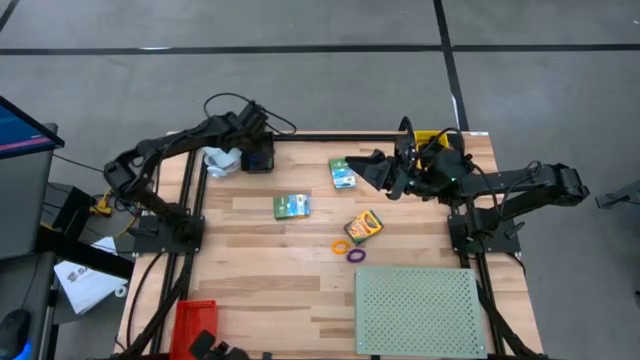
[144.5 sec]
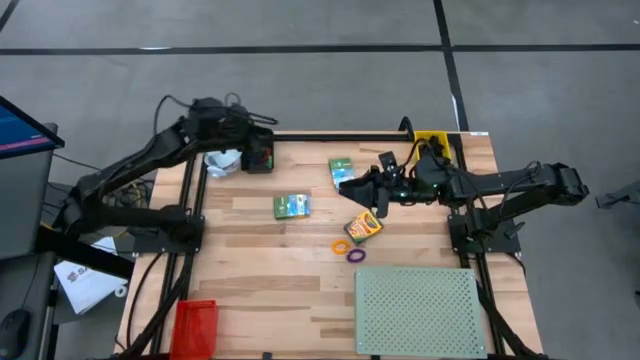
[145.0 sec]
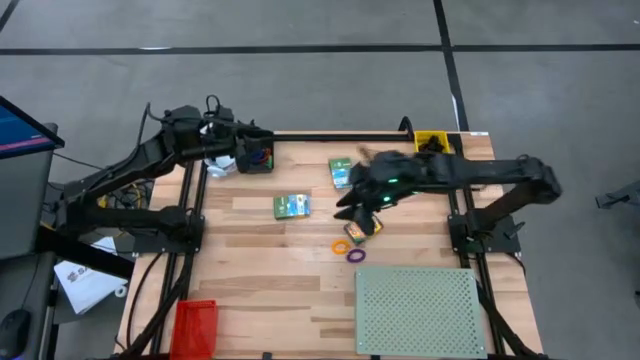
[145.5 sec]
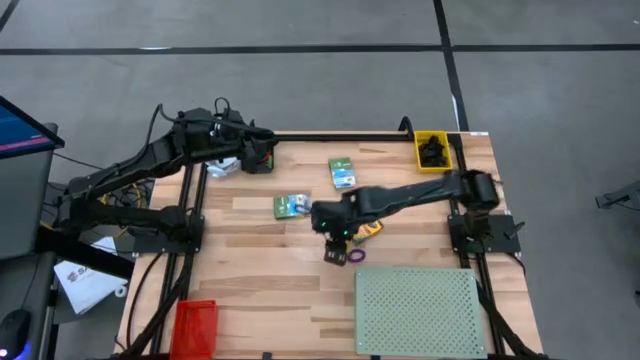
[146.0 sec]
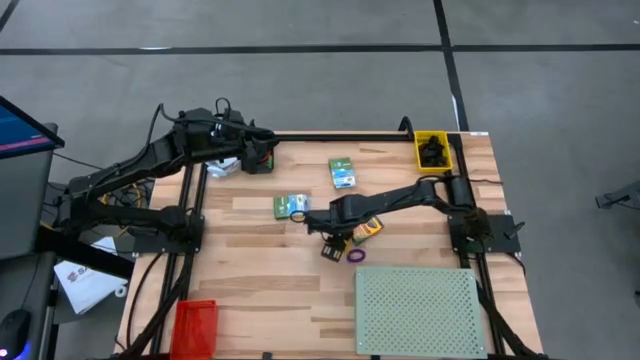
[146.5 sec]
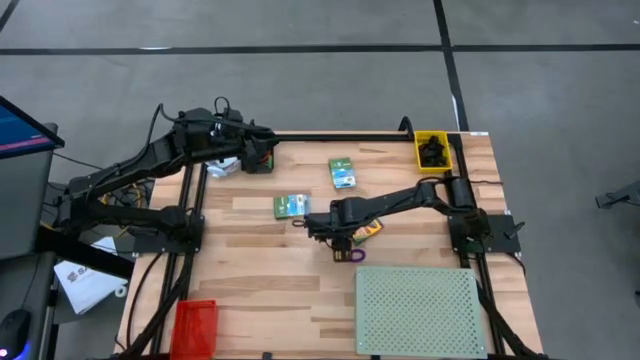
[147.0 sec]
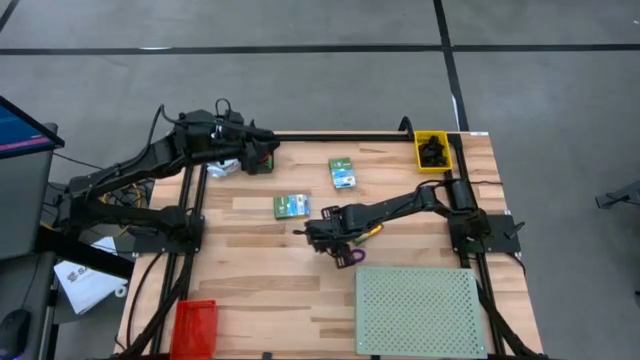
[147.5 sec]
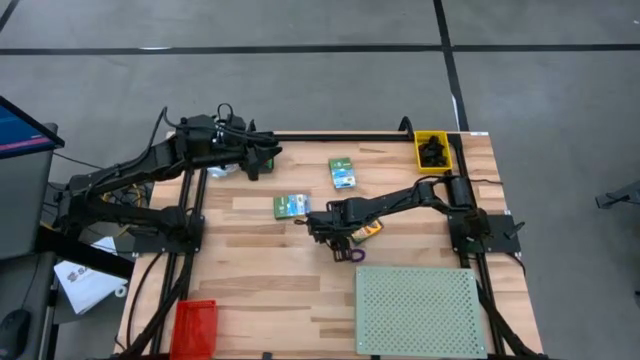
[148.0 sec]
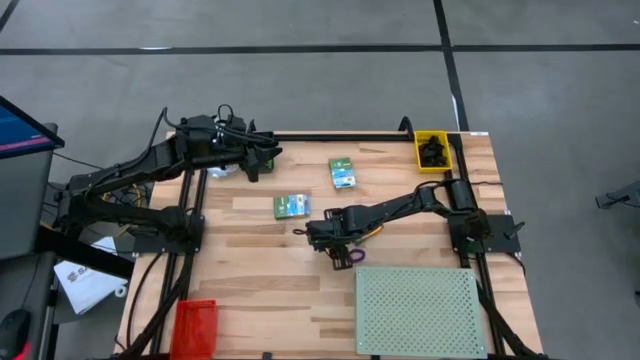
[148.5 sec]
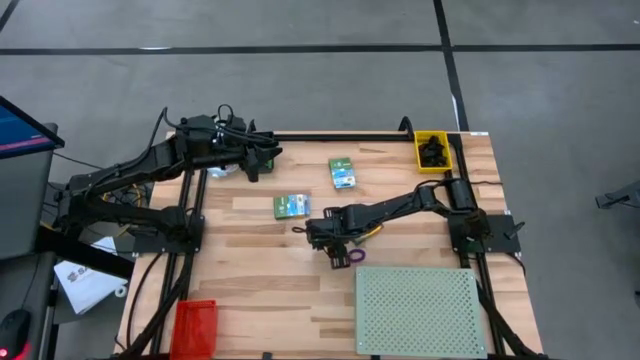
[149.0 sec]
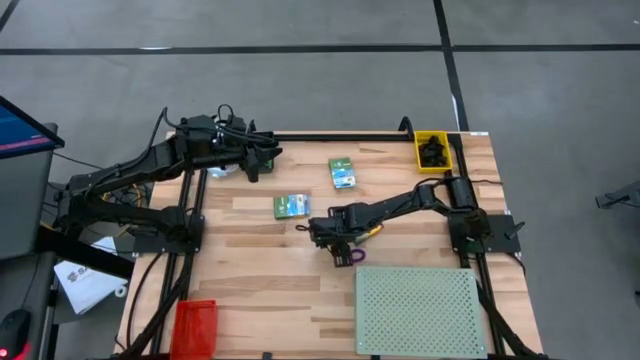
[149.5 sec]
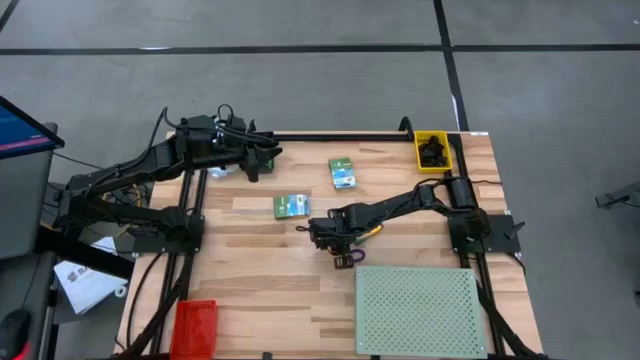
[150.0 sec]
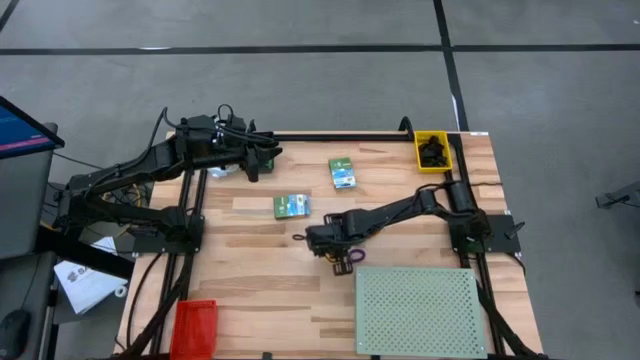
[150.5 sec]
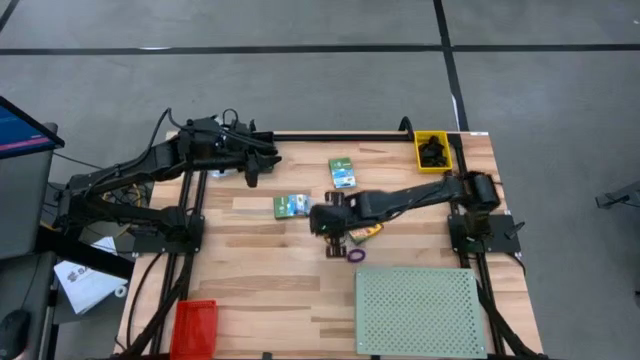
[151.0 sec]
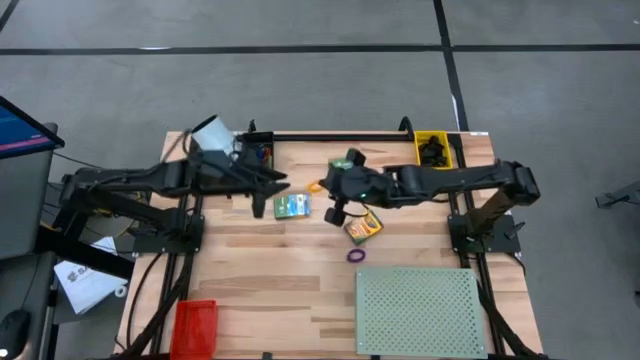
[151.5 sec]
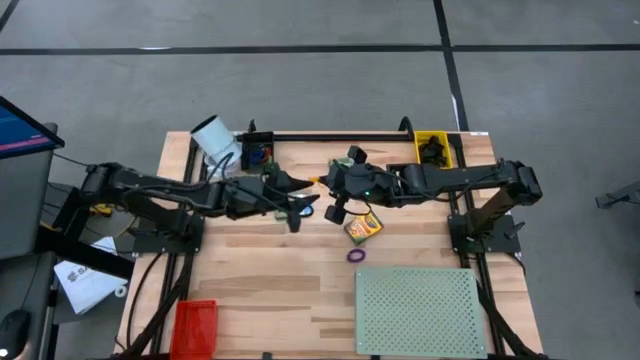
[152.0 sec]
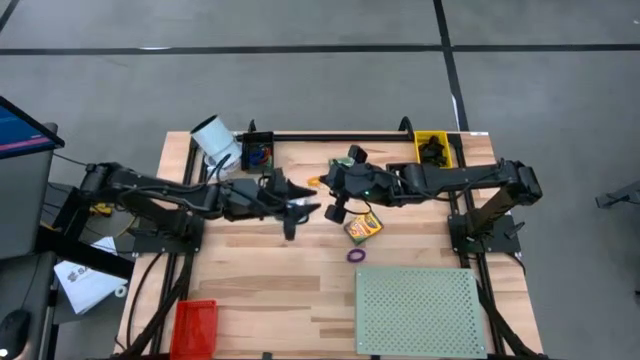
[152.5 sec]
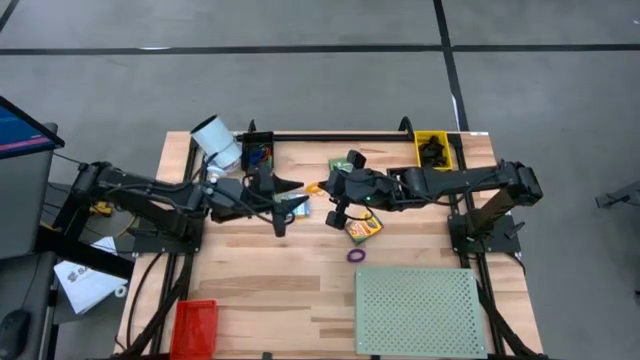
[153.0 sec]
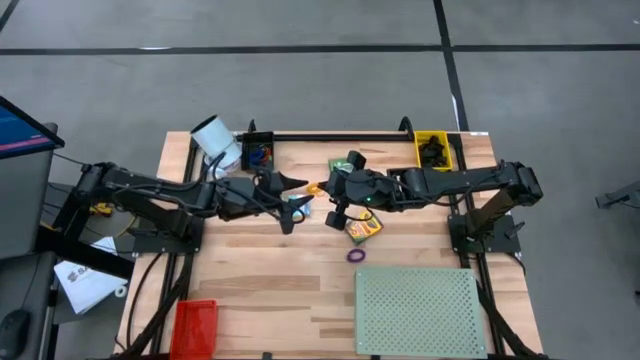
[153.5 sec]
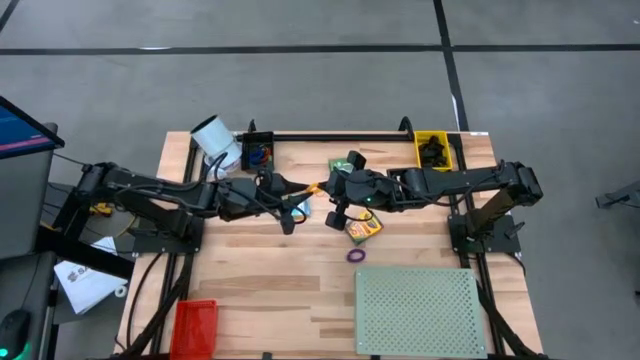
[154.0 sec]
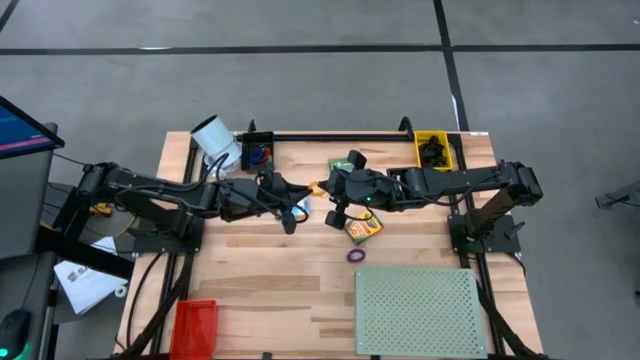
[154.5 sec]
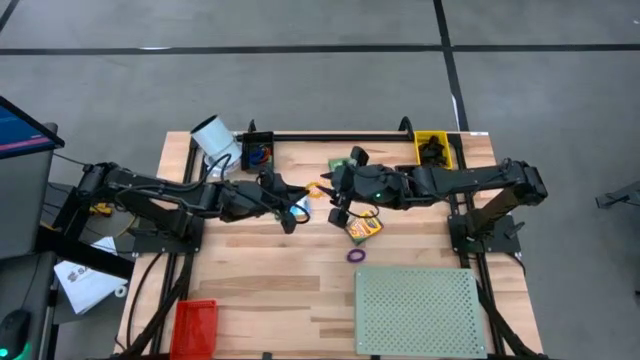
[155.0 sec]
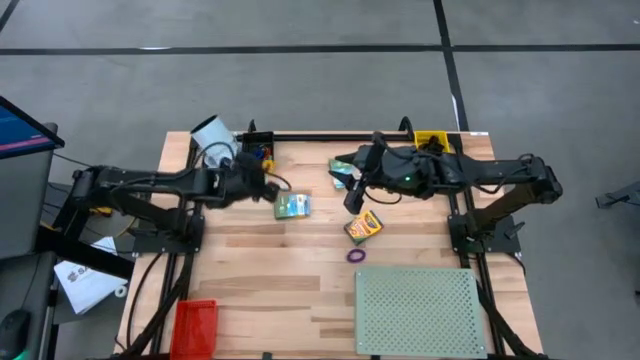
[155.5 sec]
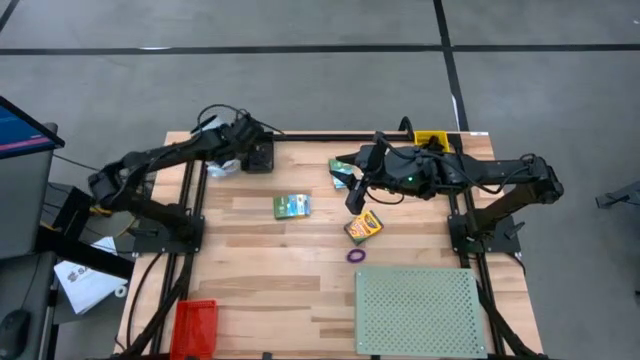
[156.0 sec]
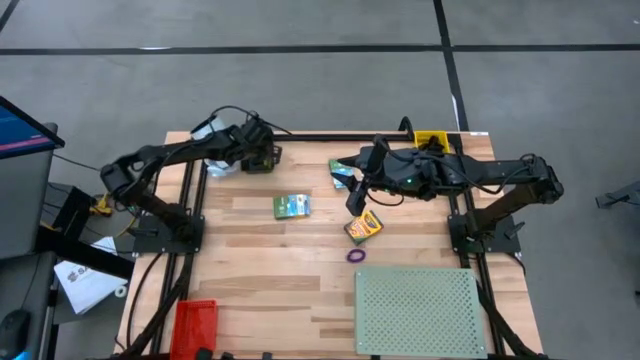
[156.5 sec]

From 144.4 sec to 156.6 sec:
Task: Pick & Place Office Desk Supplies
Put the yellow spring keychain into the black bin

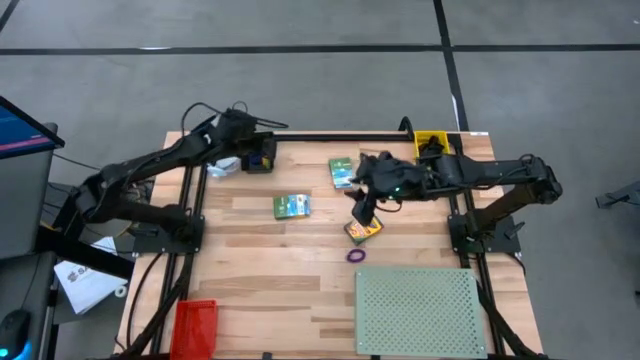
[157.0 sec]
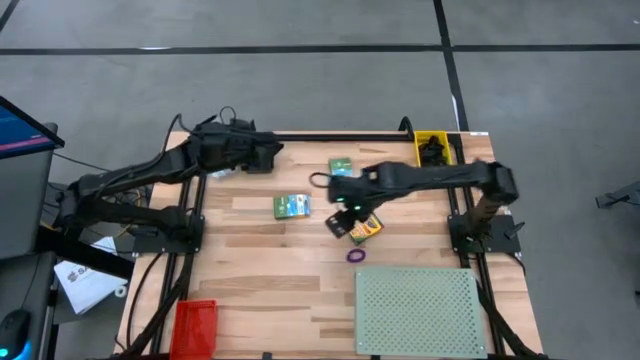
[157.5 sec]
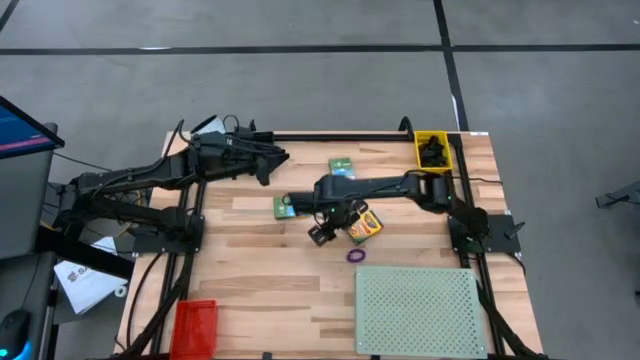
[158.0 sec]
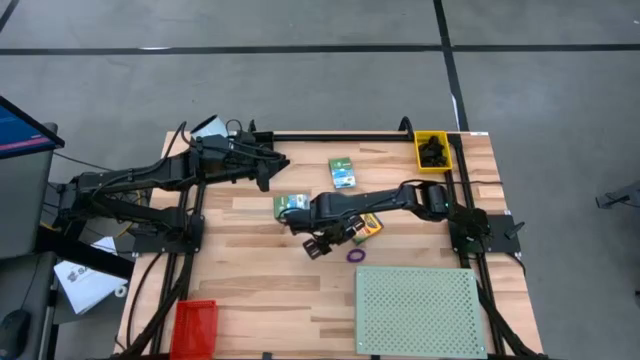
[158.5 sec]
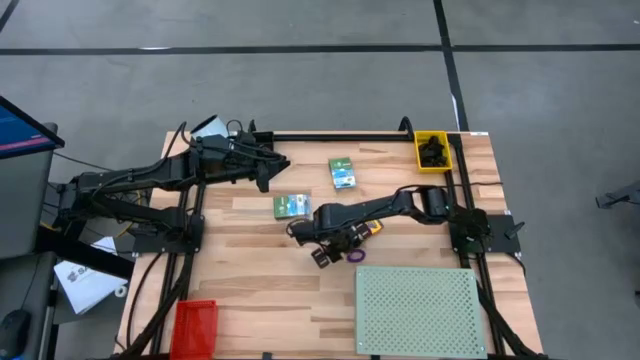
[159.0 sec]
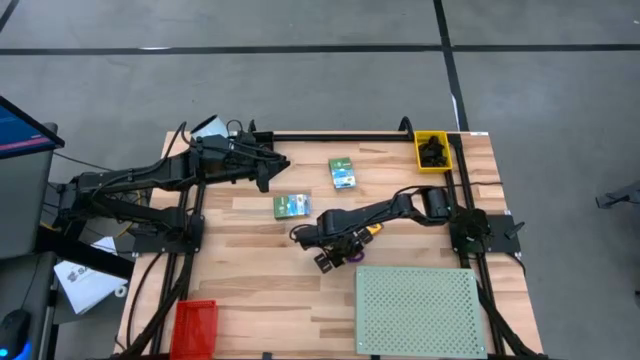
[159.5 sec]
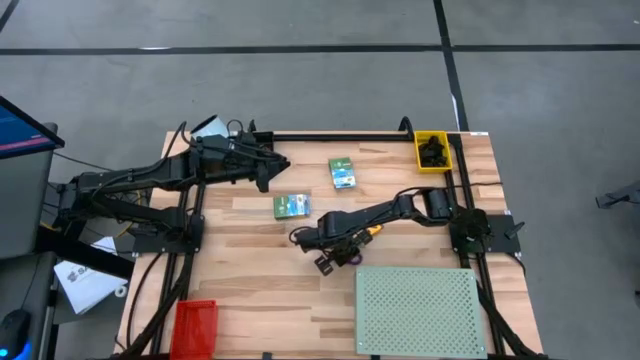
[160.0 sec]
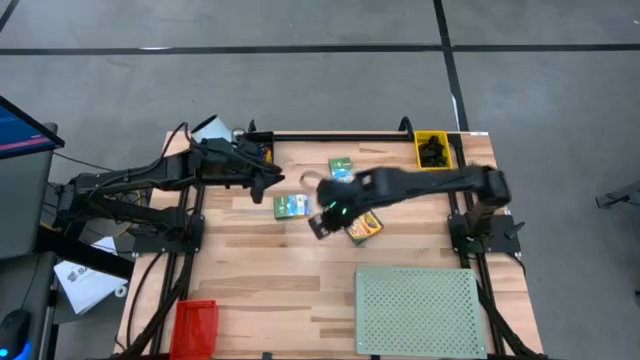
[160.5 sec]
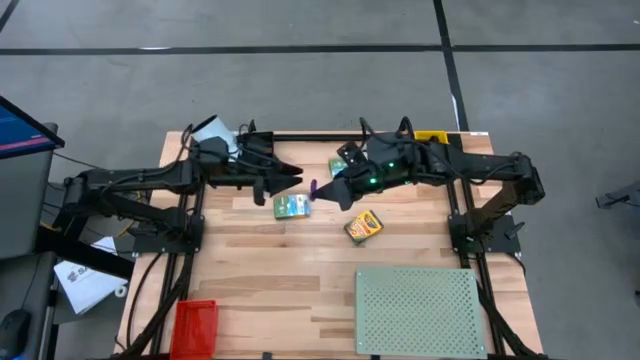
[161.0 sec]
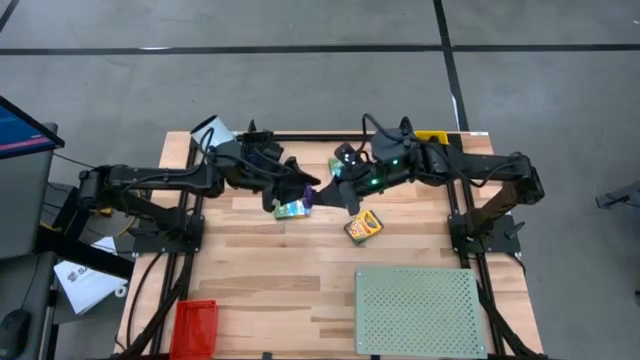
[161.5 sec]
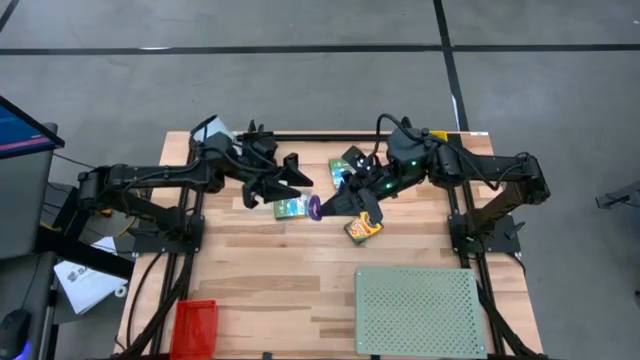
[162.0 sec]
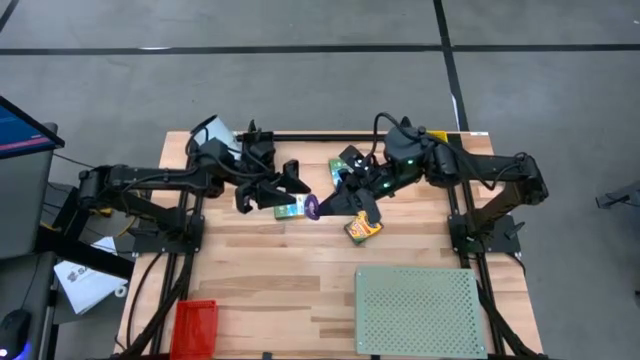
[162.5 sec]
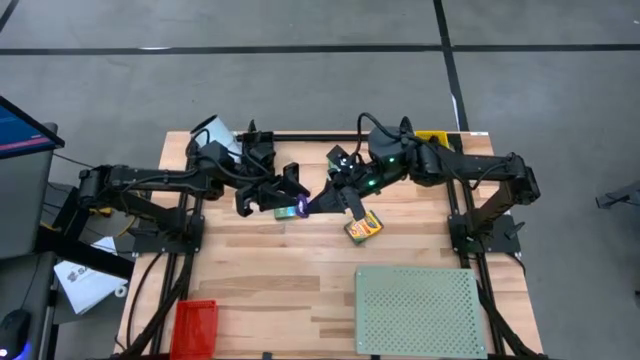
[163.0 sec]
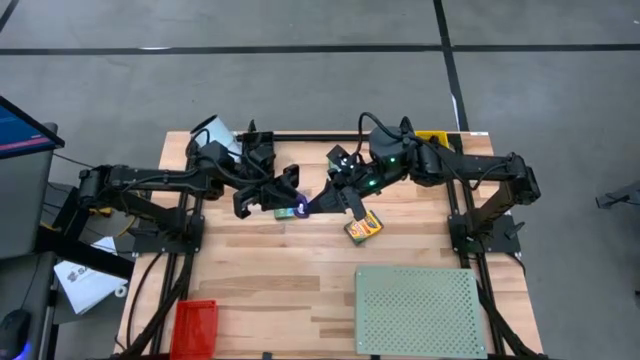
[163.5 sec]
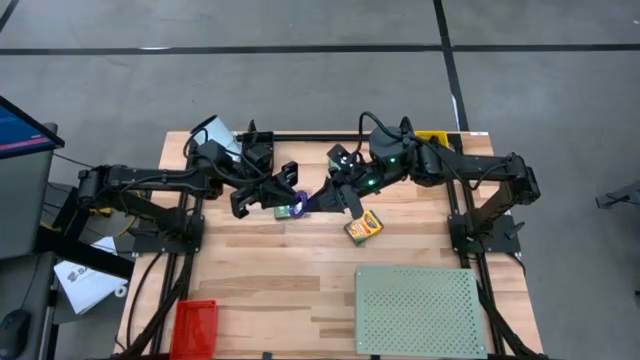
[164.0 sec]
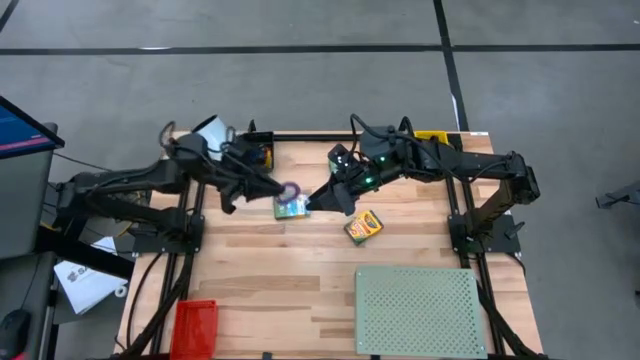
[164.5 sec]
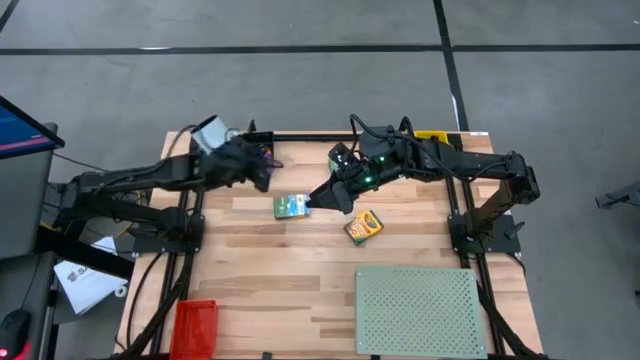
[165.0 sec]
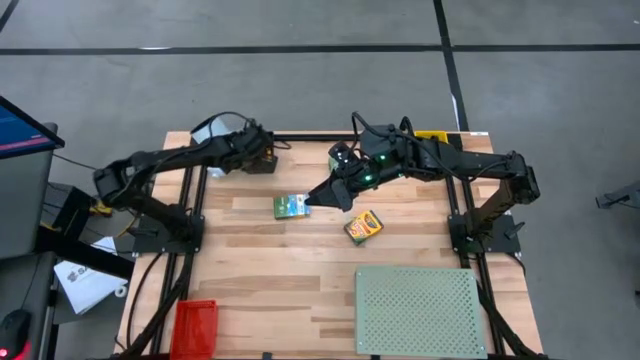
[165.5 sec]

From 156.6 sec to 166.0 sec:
Put the purple spring keychain into the black bin
